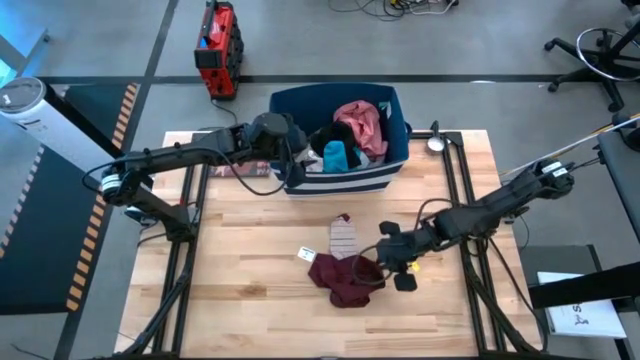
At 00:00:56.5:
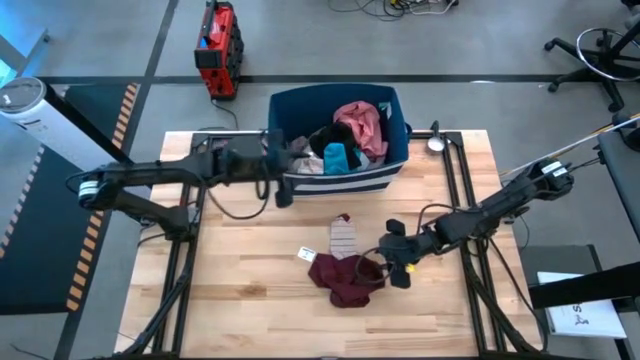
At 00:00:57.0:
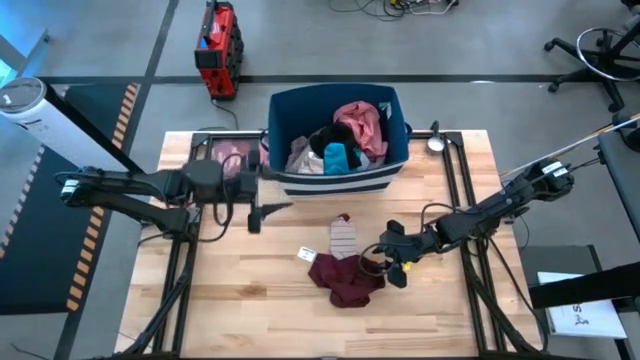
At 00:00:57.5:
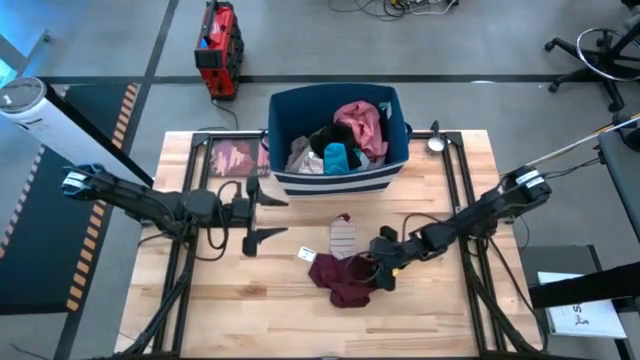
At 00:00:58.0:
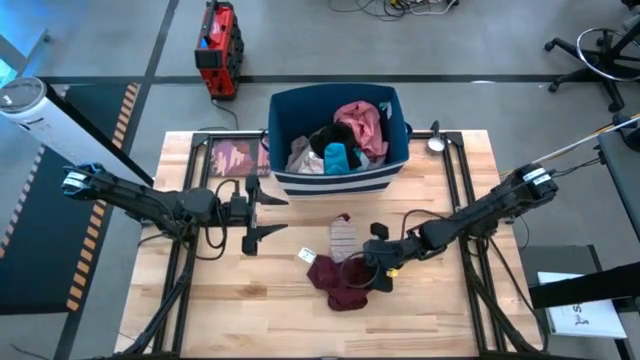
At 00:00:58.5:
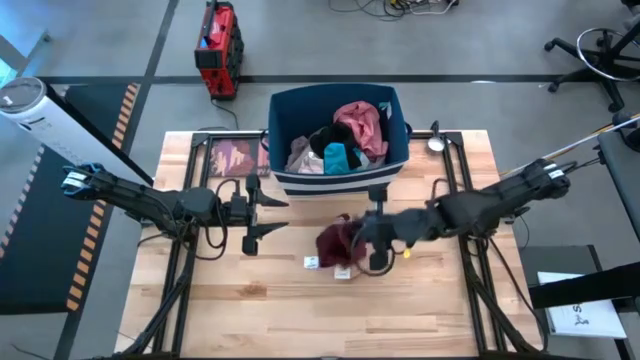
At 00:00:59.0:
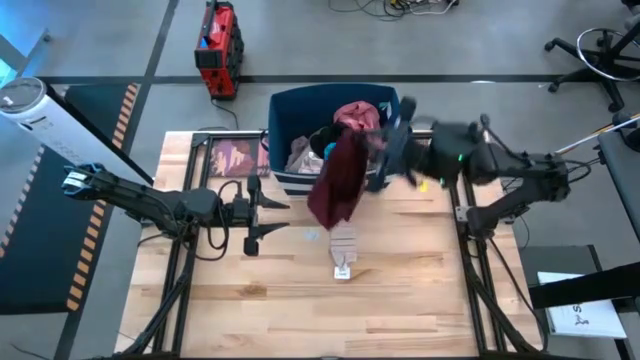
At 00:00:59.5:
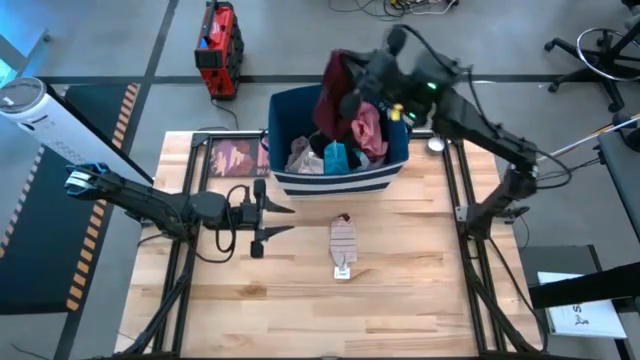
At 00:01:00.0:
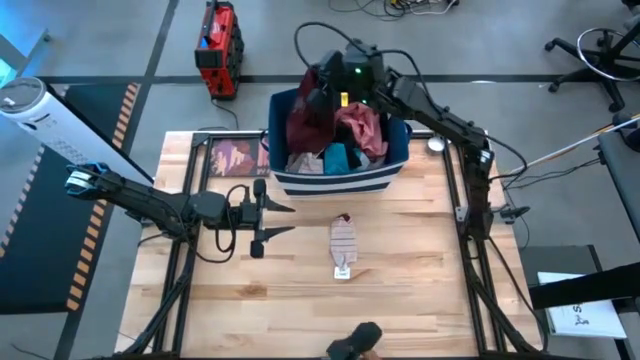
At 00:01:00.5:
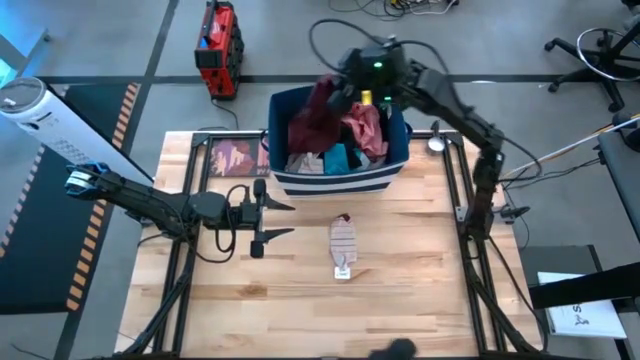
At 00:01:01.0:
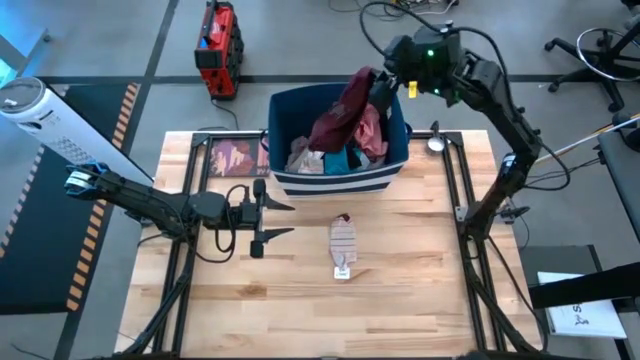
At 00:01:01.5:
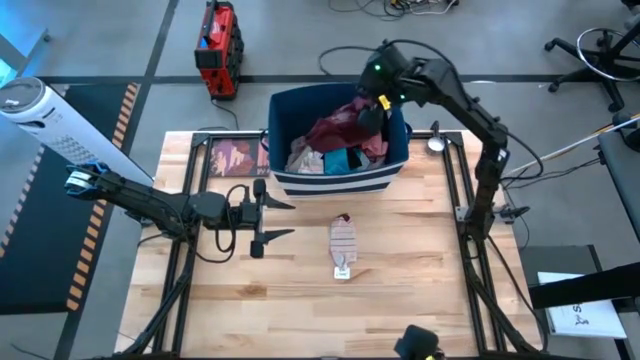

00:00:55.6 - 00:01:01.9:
Task: Sort clothes
Put the red underwear into the blue bin

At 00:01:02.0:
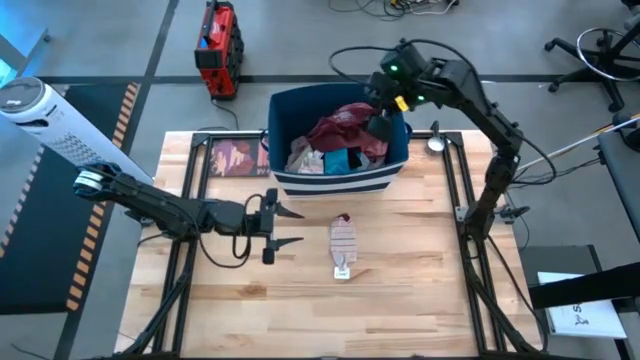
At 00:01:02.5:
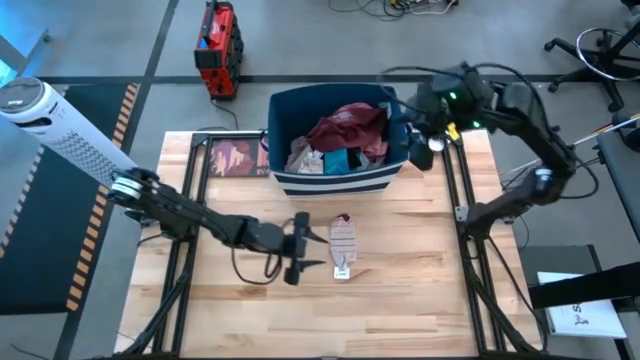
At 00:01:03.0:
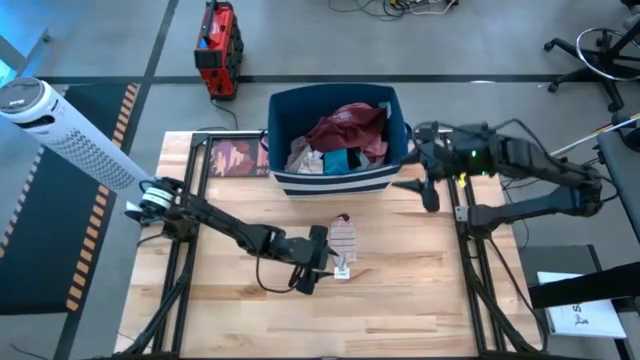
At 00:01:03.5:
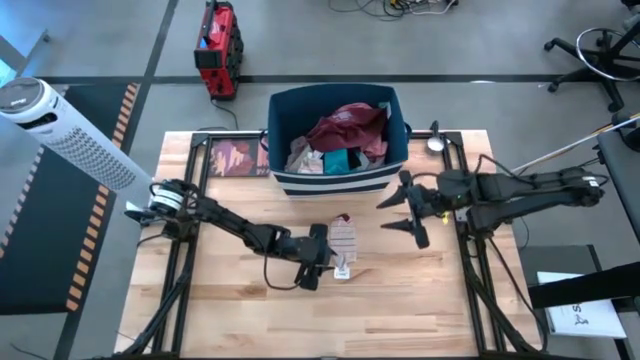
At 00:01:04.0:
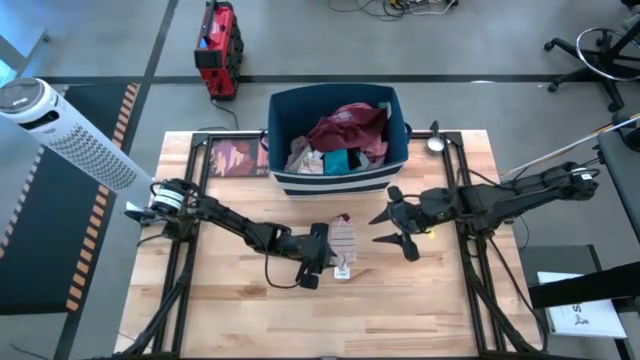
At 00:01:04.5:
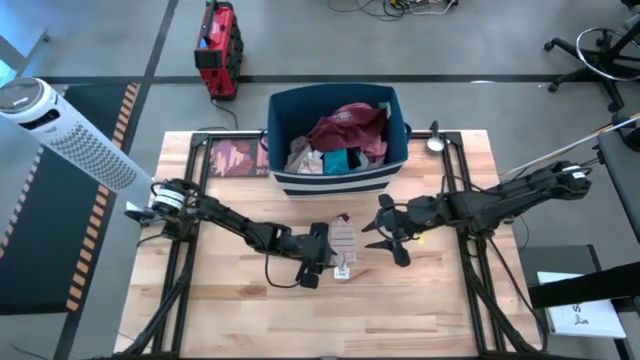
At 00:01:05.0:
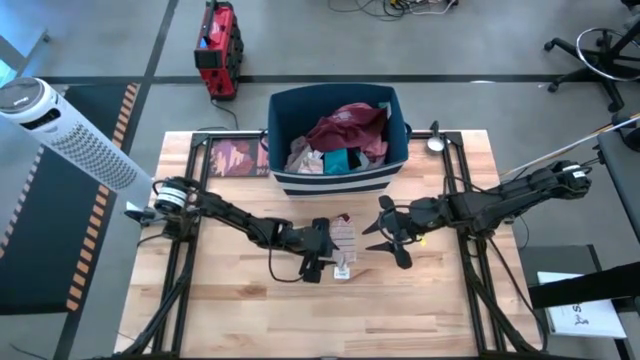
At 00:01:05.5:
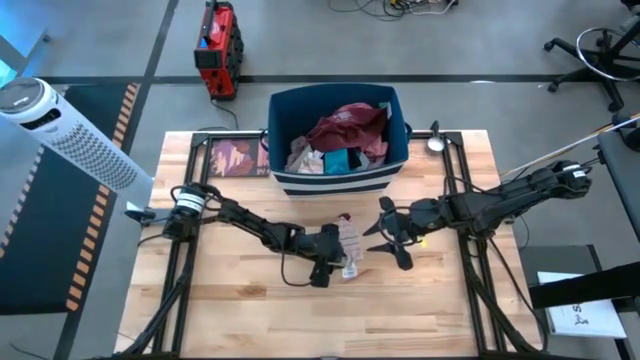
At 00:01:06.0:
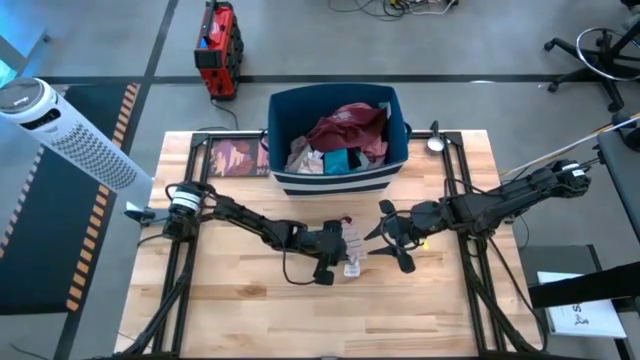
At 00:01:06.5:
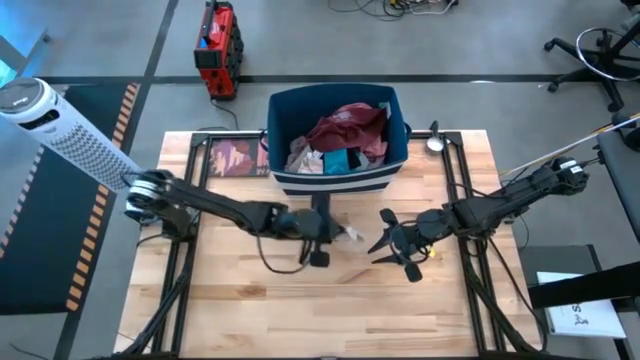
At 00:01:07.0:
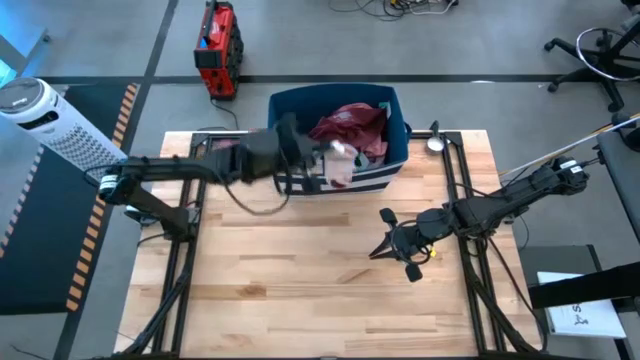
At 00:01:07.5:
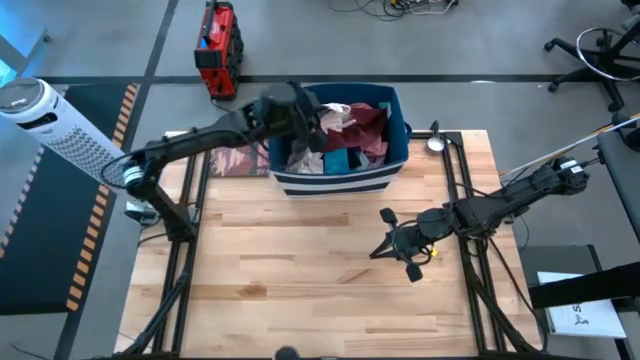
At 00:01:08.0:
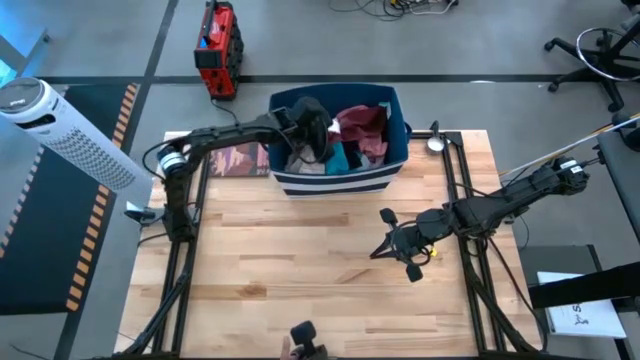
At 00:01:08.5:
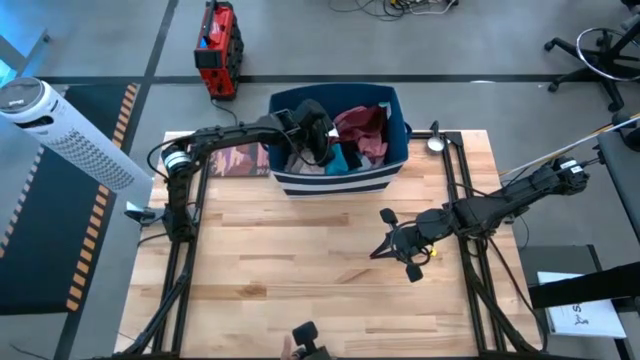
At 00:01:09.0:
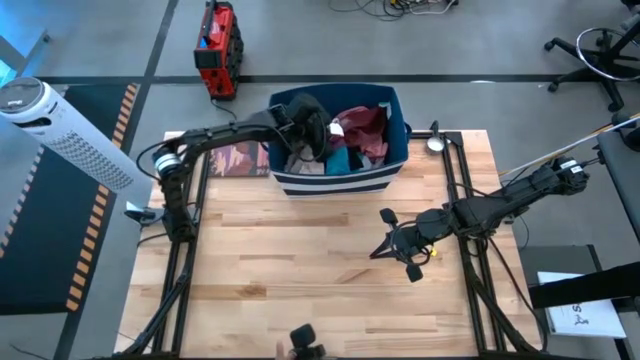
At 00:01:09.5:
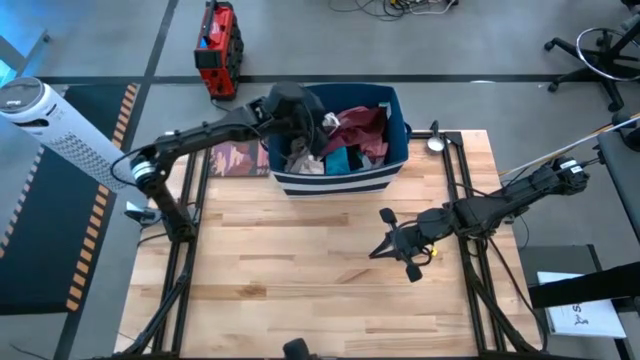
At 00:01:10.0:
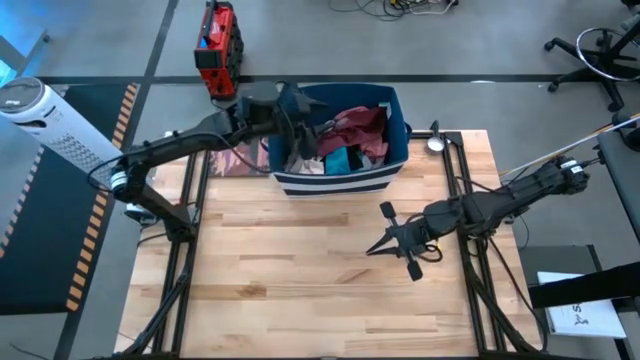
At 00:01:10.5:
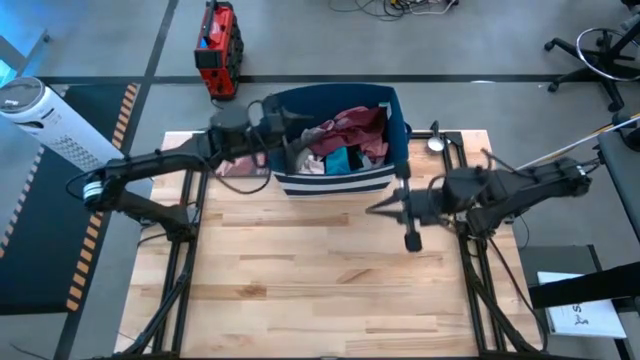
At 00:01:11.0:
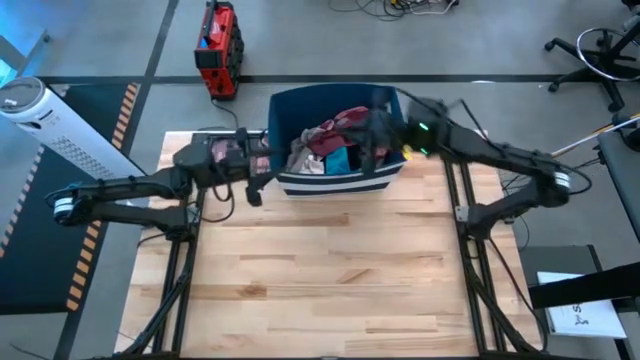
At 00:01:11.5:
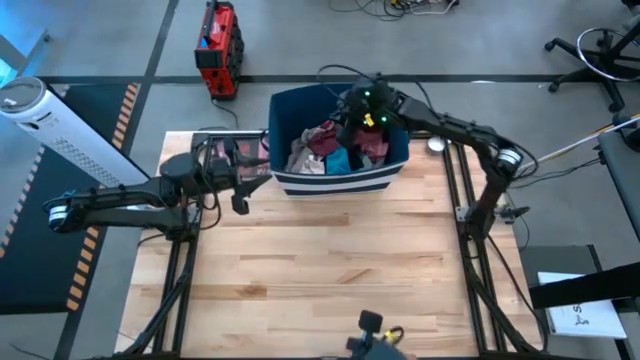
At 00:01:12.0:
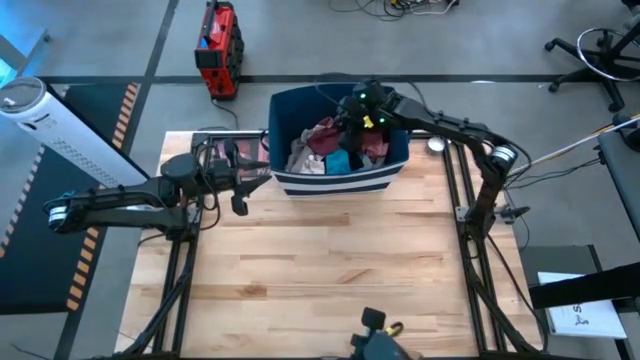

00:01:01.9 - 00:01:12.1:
Put the white sock into the blue bin

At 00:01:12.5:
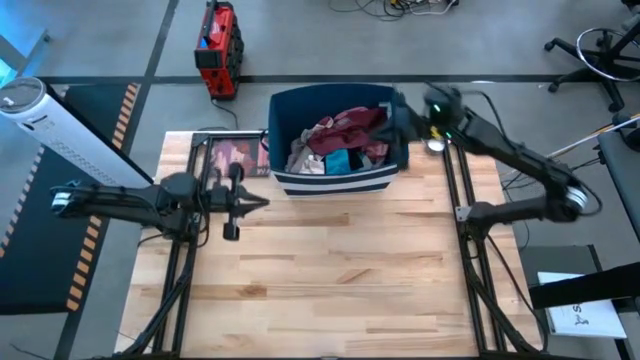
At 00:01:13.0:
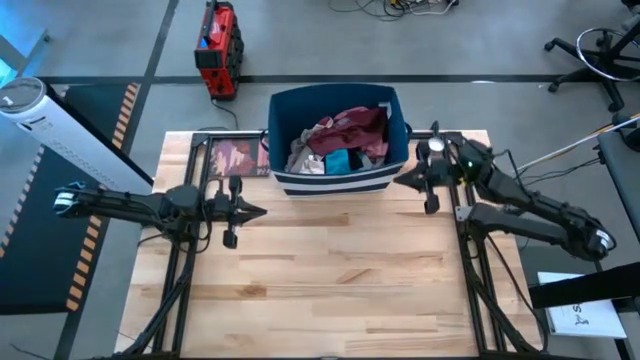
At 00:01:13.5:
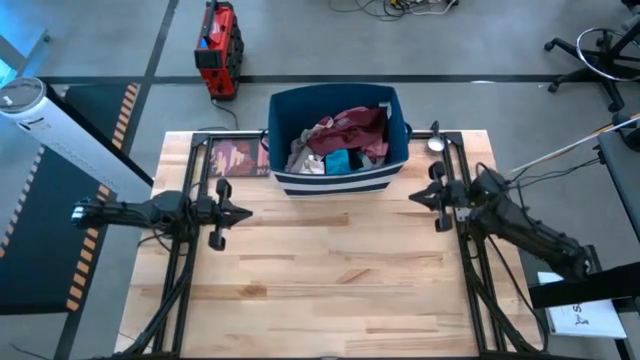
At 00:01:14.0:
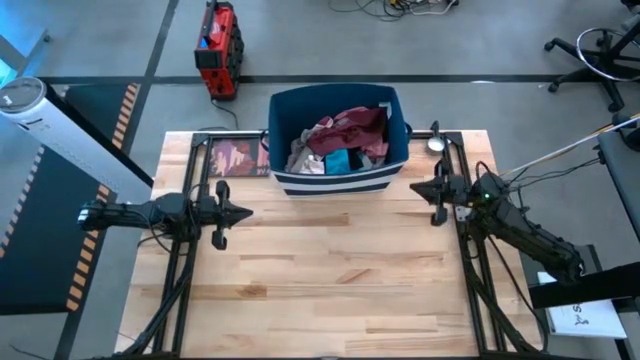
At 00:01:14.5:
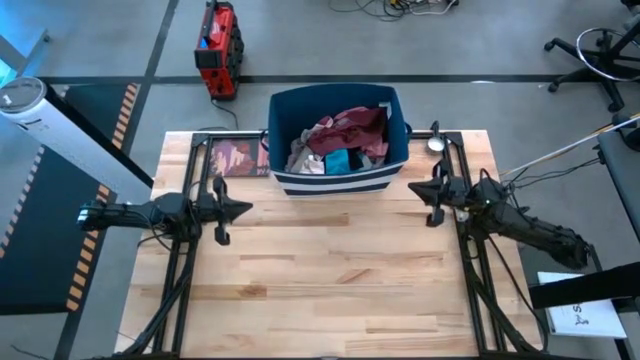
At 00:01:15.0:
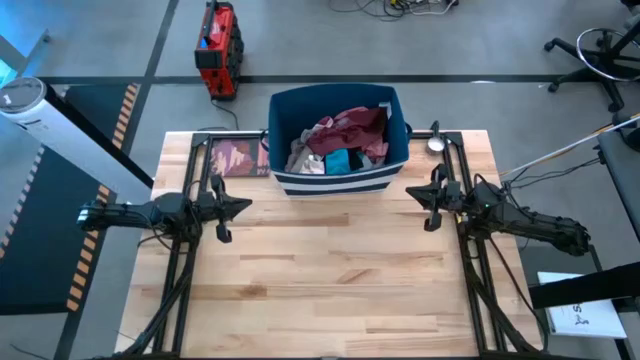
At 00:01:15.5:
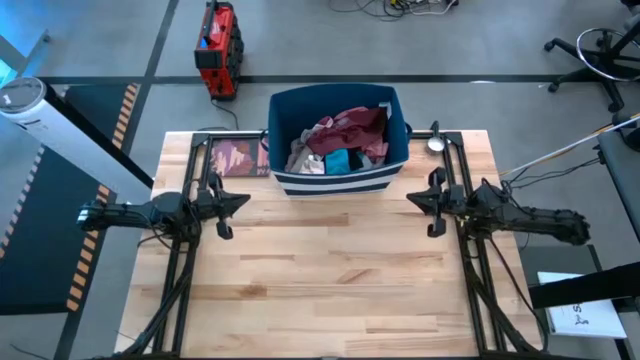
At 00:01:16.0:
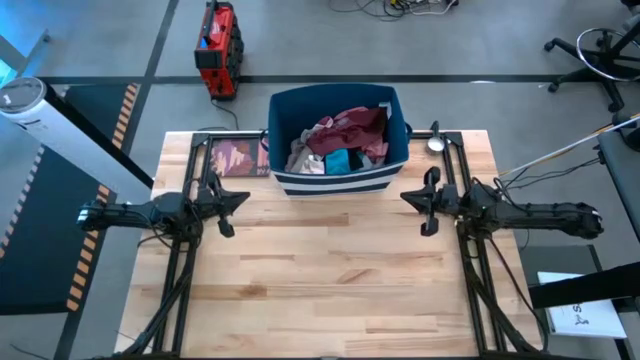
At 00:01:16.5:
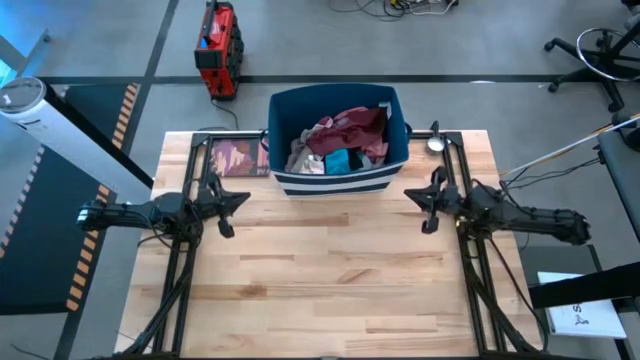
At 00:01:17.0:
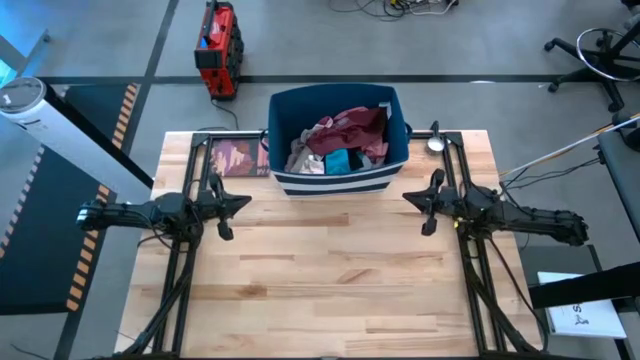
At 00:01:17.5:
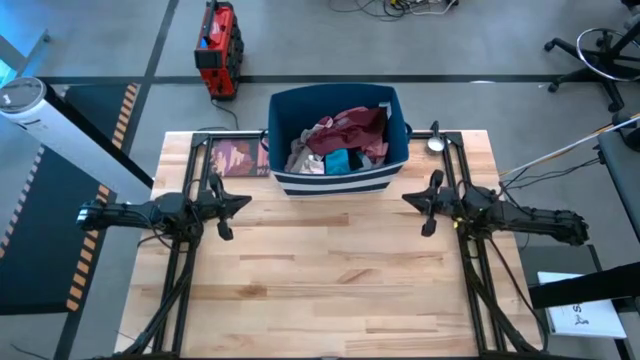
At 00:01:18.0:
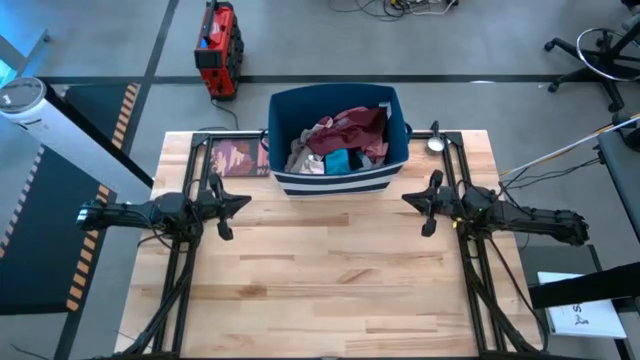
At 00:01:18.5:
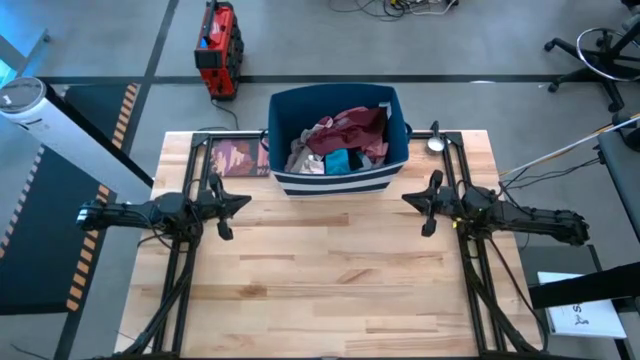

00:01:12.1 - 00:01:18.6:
Return to Home Position
